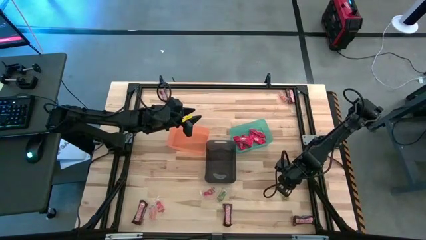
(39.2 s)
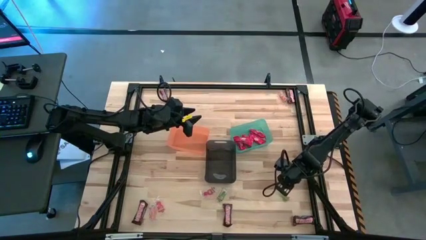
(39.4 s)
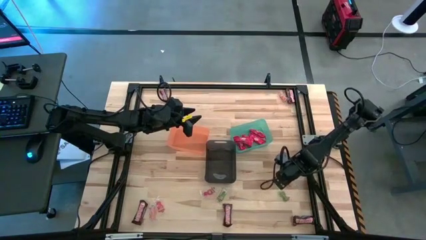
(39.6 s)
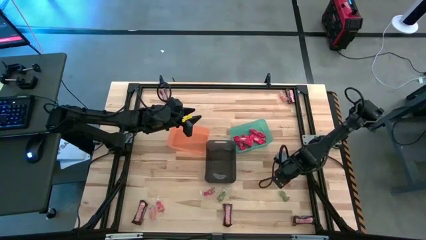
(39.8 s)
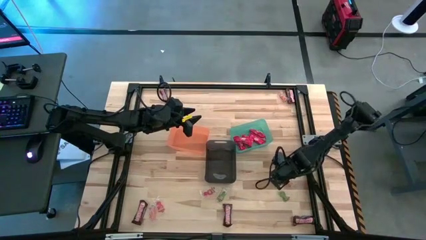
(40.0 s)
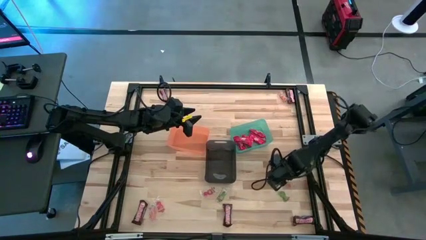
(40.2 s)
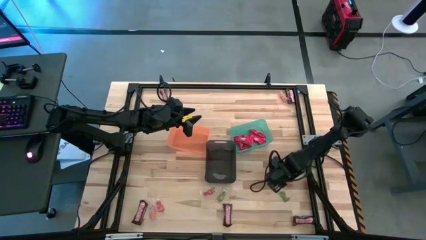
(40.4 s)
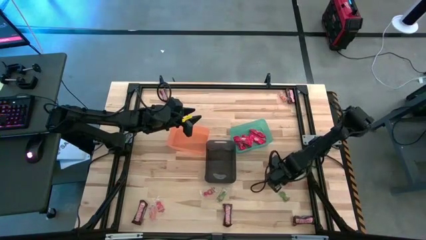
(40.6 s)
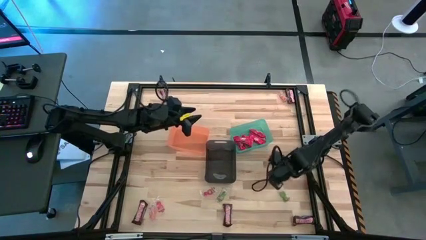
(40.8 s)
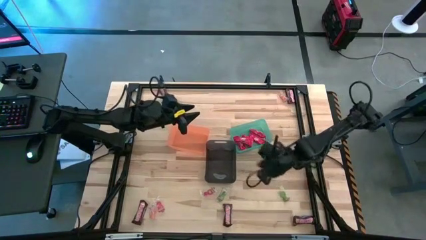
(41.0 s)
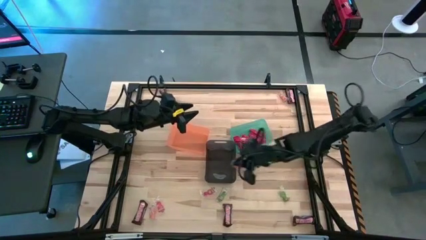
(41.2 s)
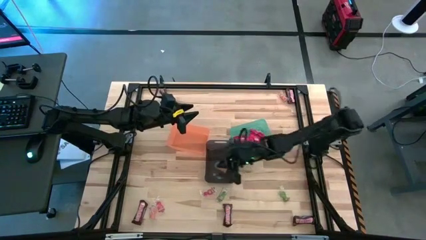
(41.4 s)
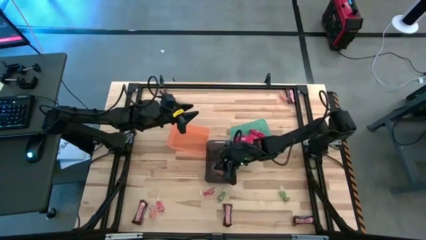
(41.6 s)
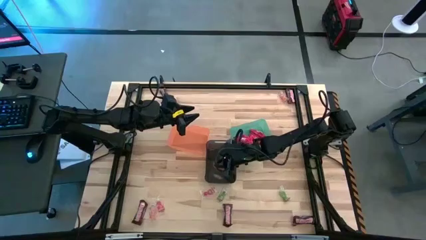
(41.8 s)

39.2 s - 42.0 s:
Task: Sort candy by brand, put in halloween buckets
Put the orange gummy into the black bin

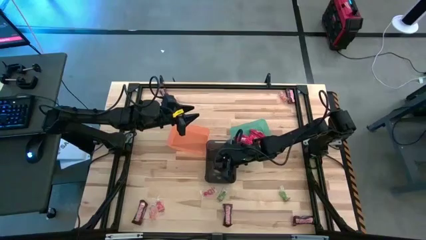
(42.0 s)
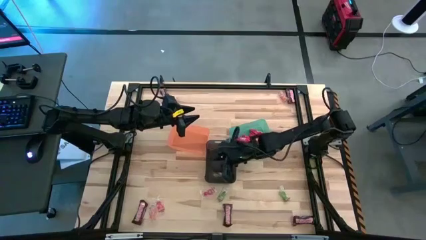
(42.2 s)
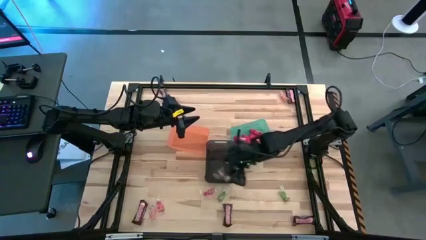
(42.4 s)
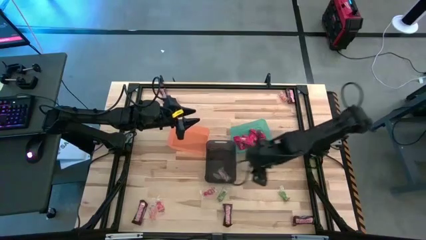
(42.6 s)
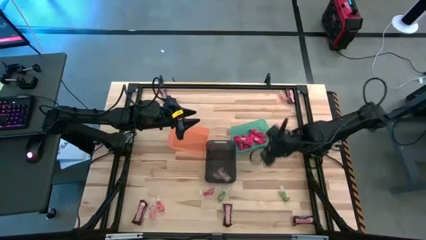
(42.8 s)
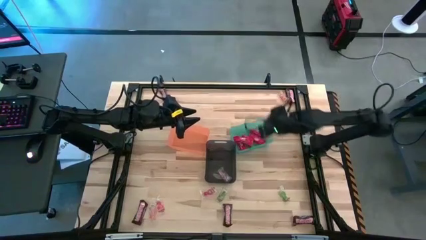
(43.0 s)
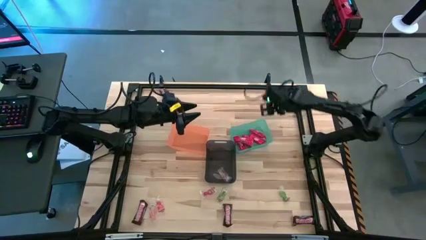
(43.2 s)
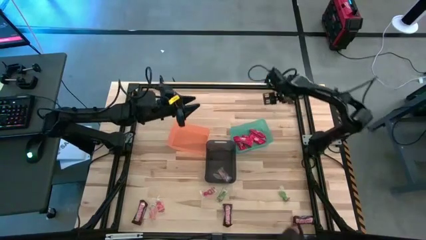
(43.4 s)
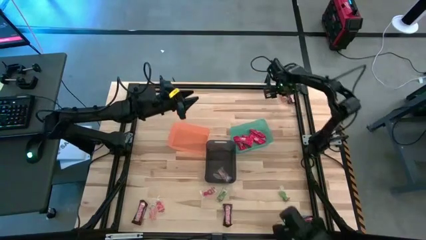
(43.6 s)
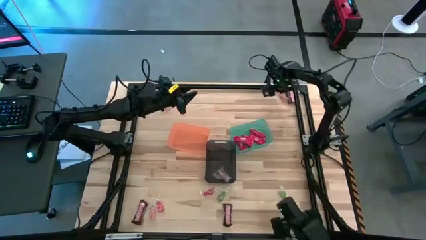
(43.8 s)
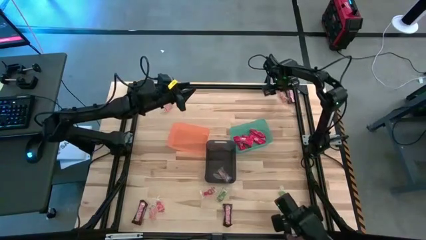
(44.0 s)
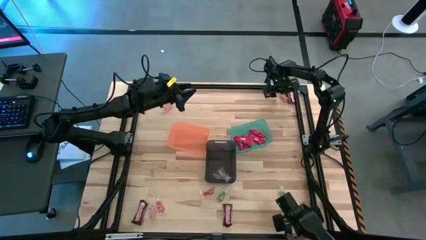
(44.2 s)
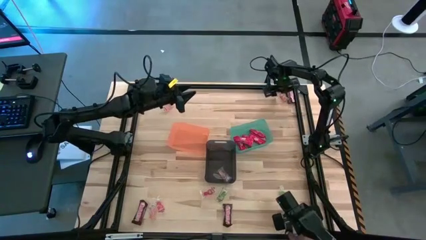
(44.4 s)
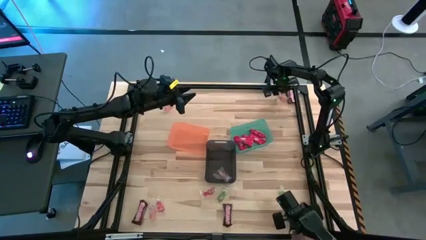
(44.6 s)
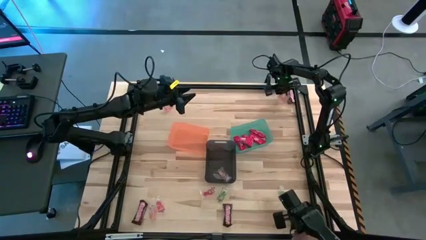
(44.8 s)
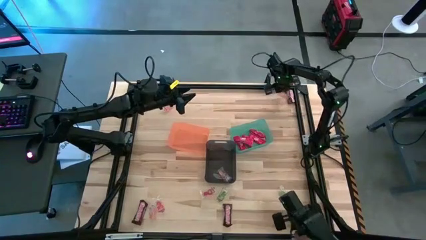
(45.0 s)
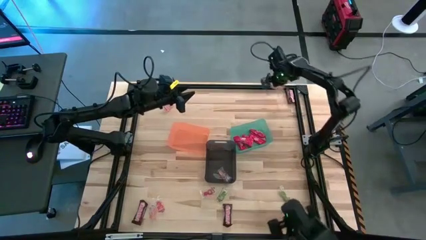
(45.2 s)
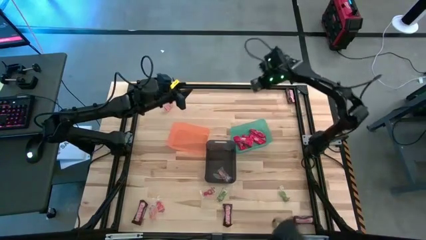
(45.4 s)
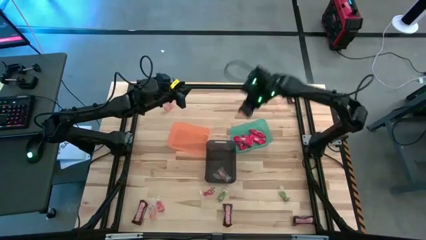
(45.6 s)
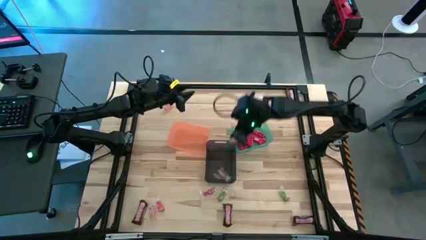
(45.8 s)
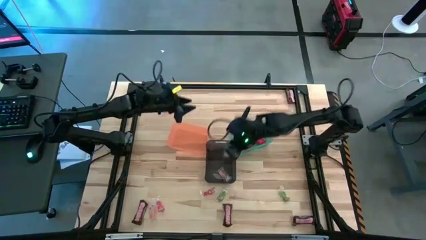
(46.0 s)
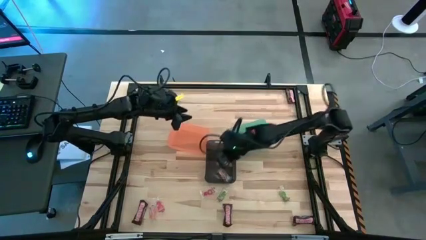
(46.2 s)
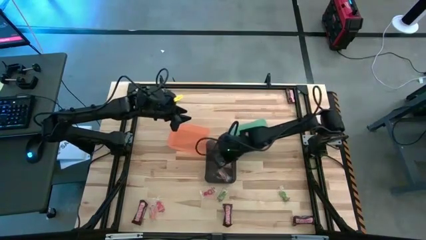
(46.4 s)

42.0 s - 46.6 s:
Put the orange gummy into the black bin

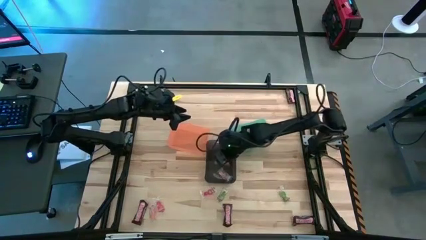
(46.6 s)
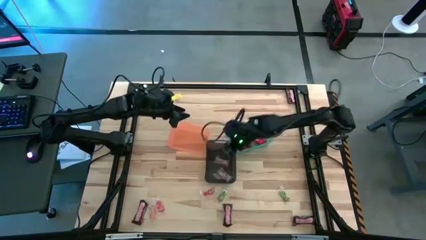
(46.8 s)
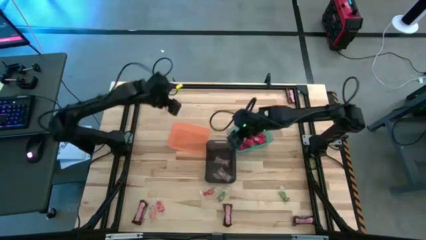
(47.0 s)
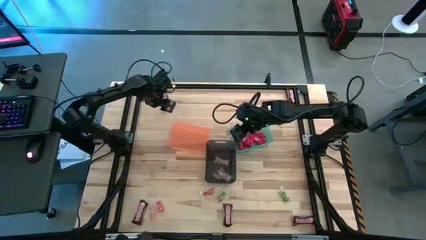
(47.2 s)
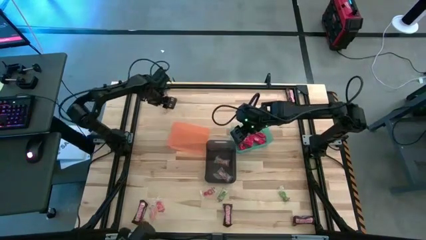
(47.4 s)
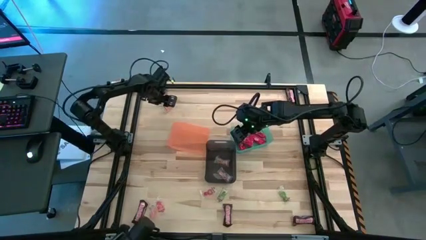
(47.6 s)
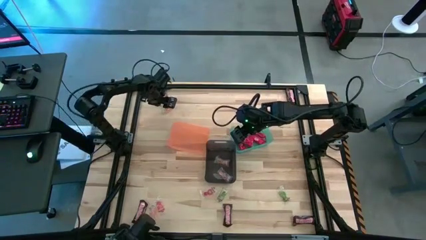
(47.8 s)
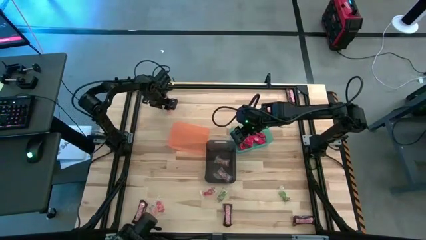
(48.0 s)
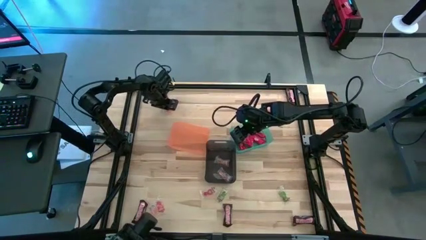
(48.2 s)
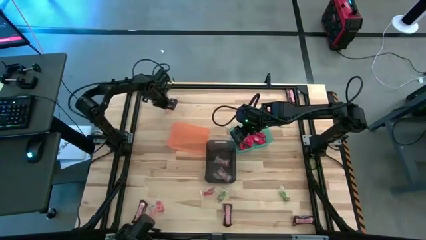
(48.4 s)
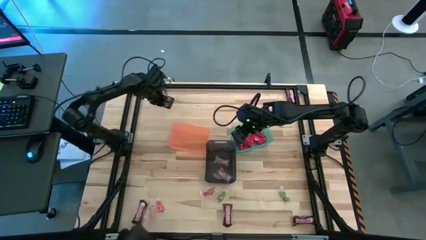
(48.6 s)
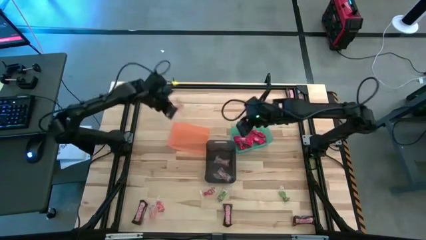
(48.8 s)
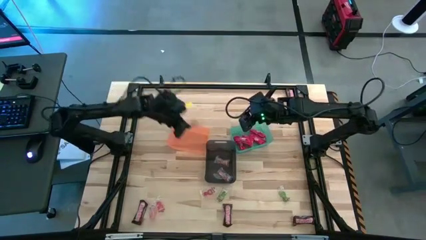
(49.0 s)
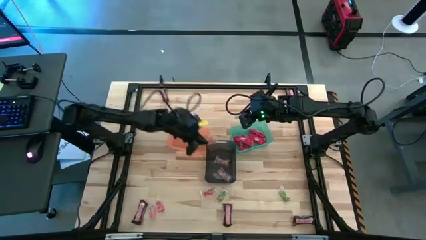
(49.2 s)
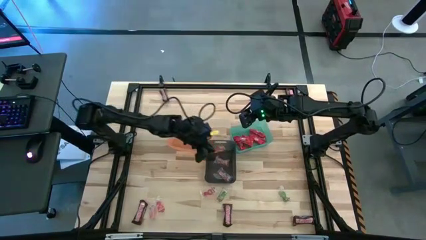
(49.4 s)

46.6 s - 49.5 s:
Put the orange gummy into the black bin

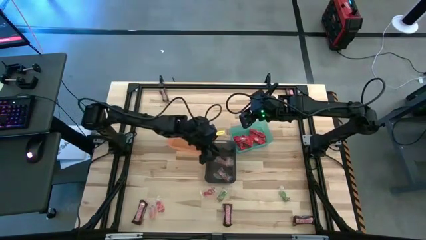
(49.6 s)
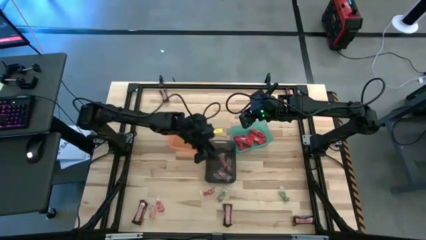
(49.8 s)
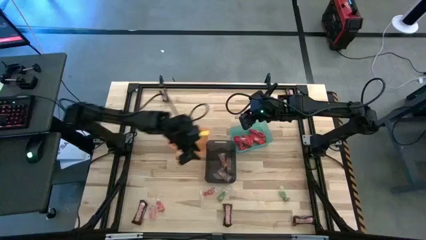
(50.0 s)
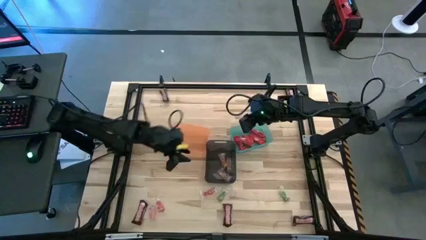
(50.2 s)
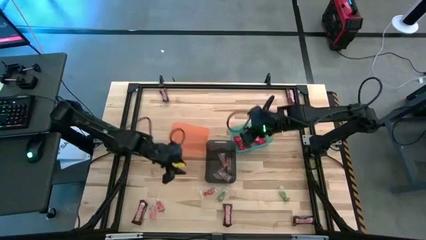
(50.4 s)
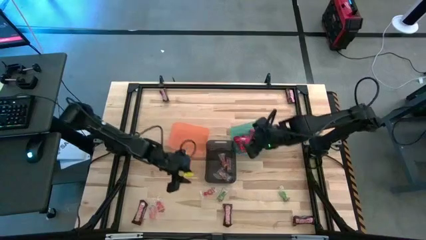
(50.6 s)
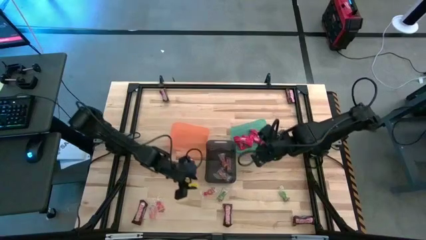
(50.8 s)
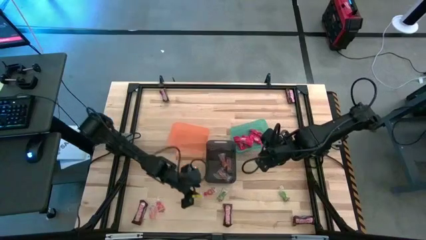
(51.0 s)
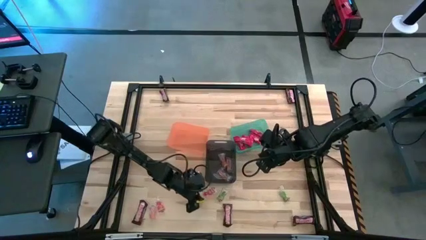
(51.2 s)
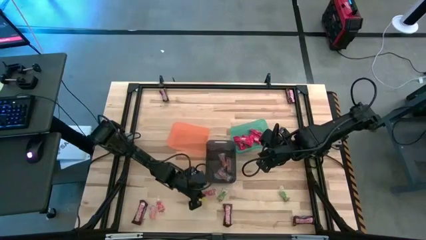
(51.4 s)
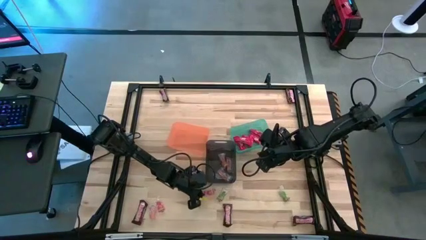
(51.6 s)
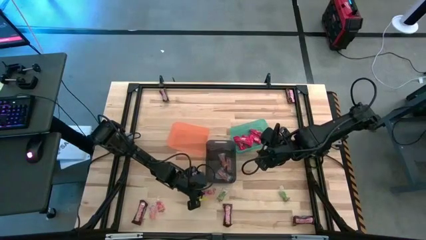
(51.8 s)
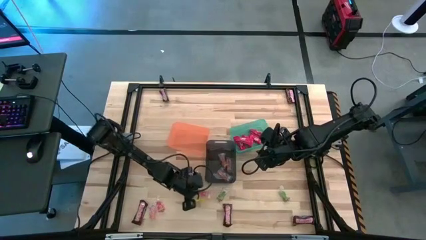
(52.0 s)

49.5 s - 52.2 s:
Put the red gummy into the black bin

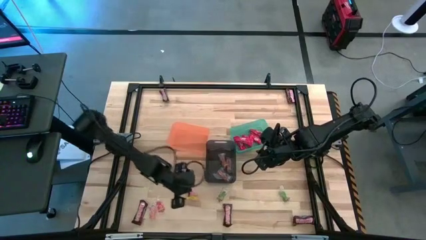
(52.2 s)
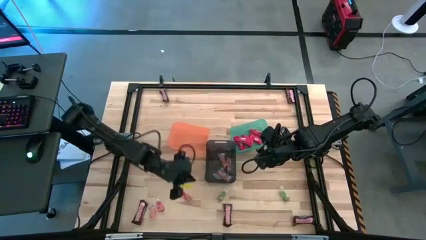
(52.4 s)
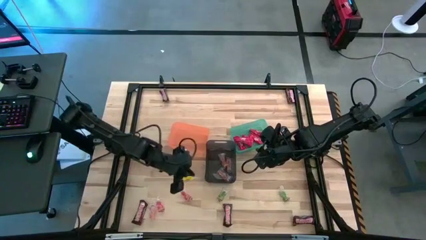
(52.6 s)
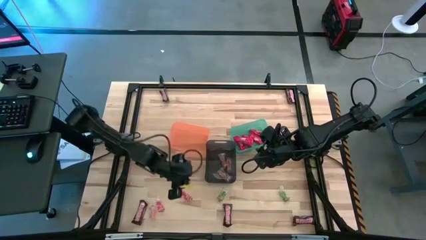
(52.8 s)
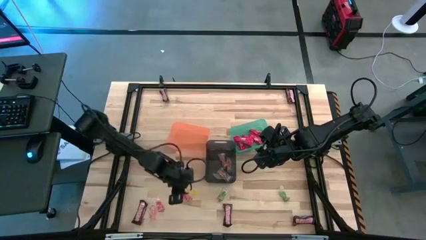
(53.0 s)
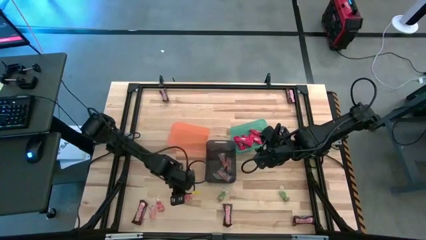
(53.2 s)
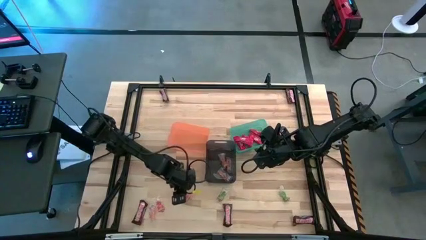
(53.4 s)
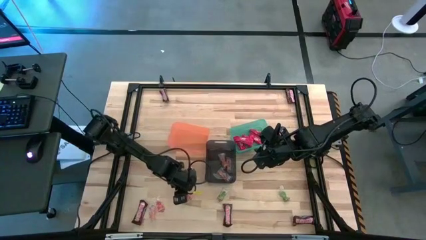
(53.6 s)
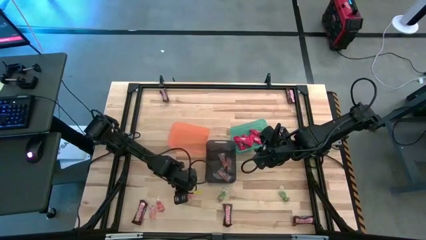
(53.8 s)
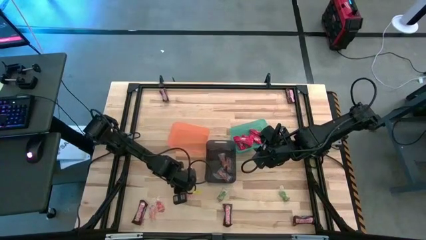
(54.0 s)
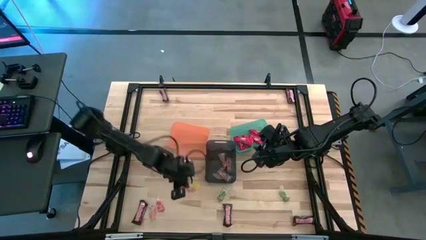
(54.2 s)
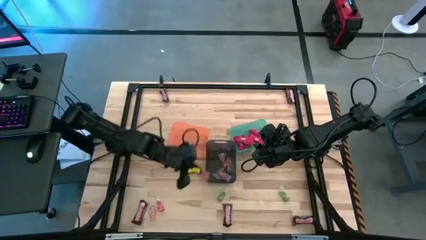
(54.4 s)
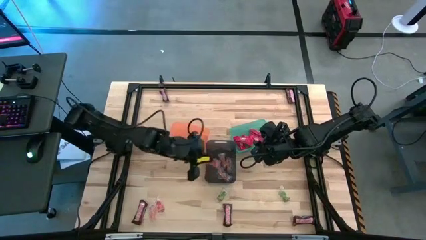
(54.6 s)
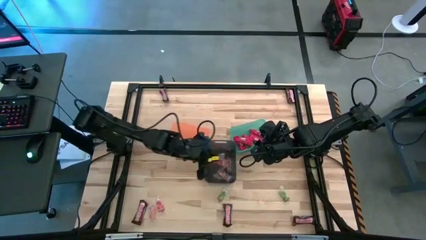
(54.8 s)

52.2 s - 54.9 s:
Put the red gummy into the black bin

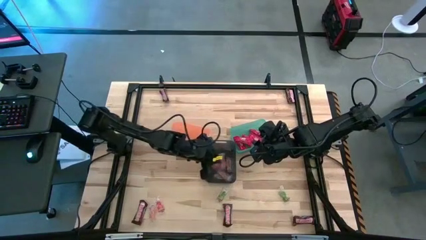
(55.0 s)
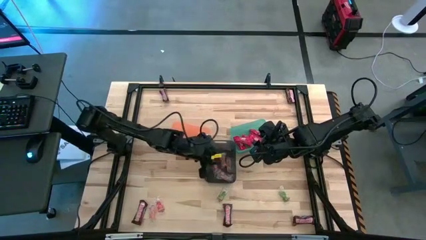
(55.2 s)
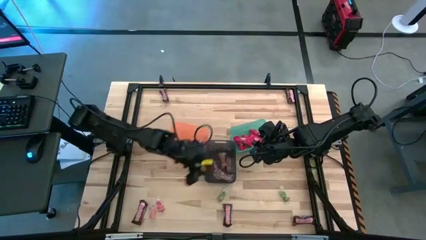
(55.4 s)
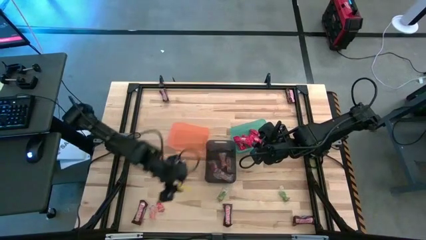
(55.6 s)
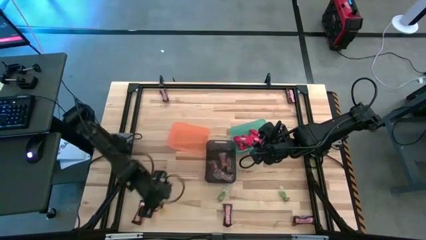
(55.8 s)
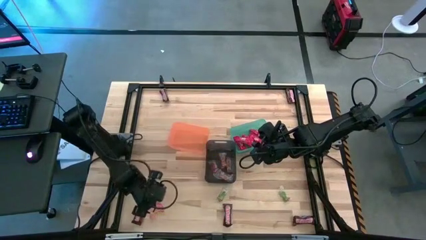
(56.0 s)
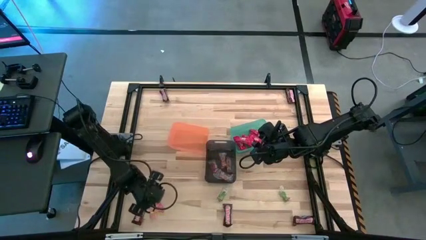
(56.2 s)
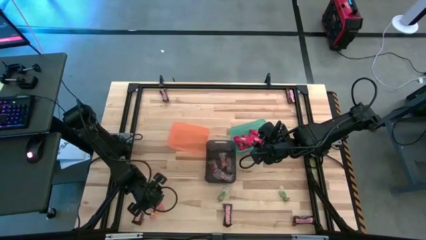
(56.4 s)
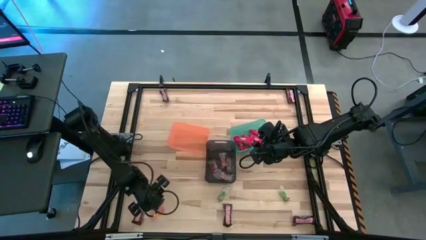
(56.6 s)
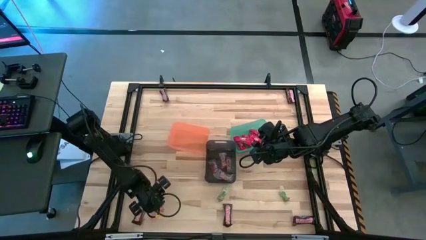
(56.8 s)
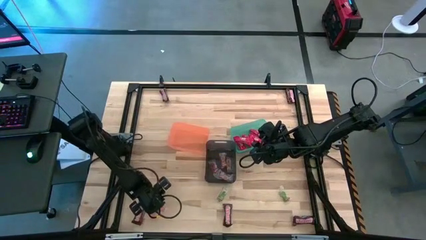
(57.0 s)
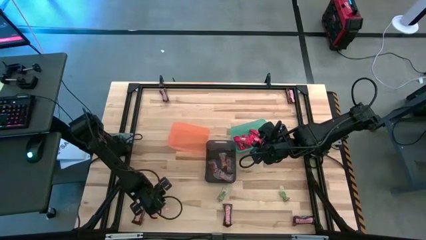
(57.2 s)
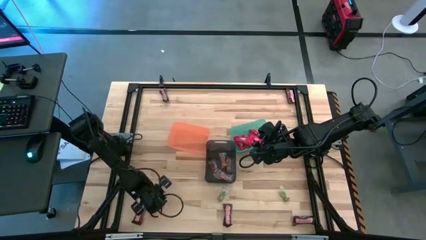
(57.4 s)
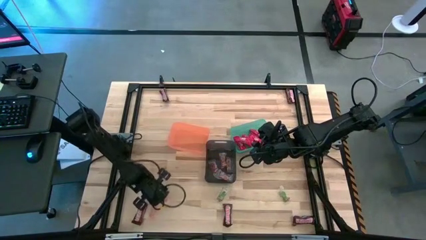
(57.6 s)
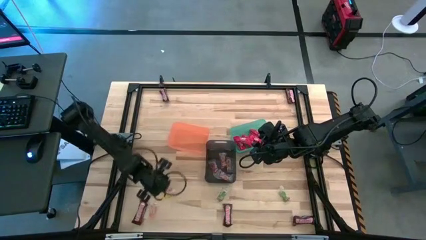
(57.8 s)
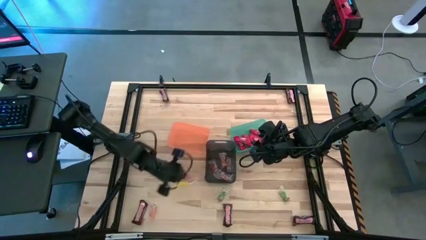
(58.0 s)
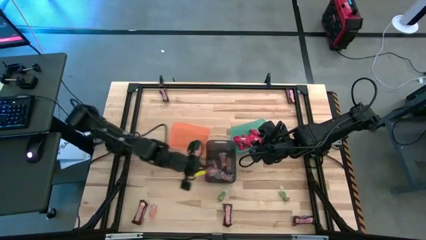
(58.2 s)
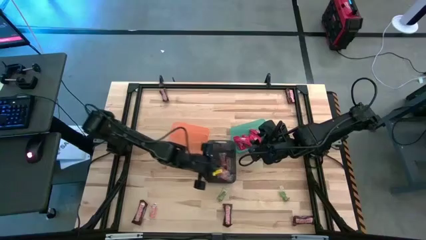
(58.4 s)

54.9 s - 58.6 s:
Put the red gummy into the black bin
